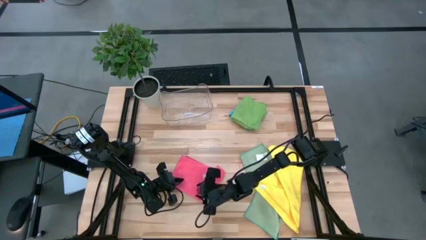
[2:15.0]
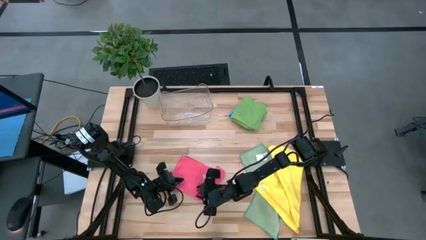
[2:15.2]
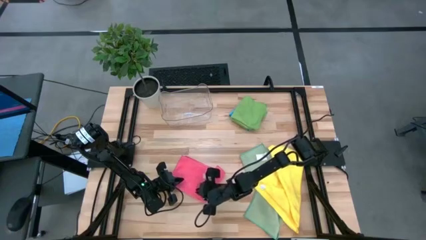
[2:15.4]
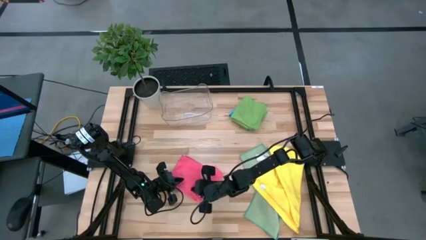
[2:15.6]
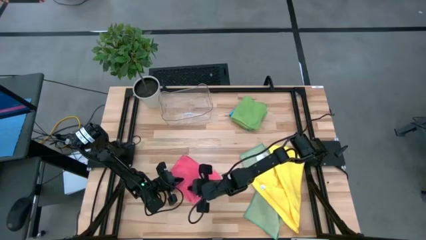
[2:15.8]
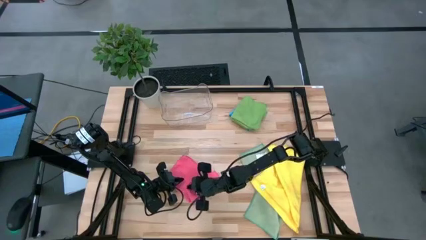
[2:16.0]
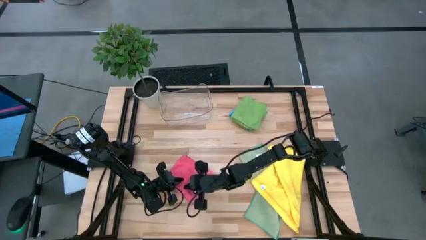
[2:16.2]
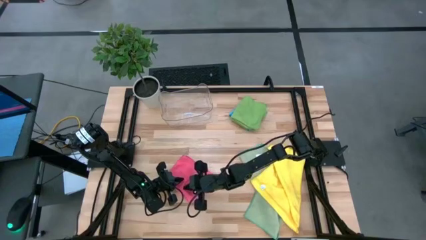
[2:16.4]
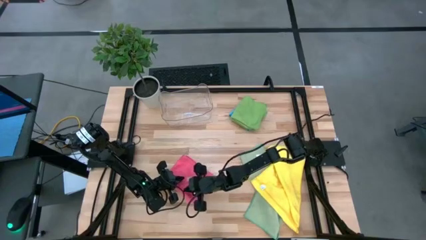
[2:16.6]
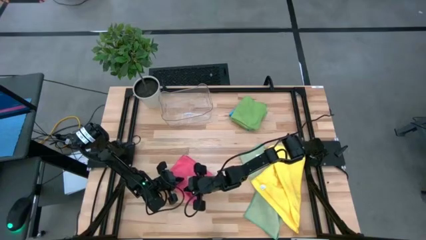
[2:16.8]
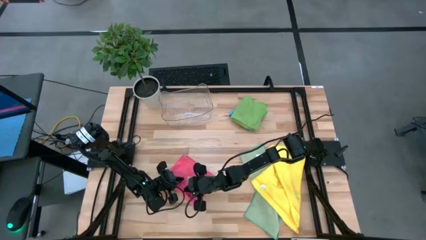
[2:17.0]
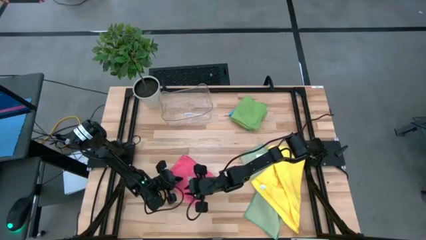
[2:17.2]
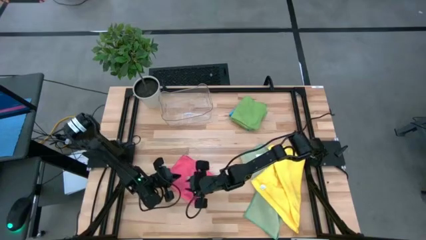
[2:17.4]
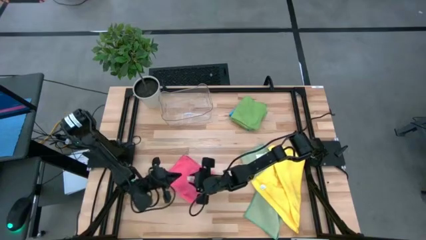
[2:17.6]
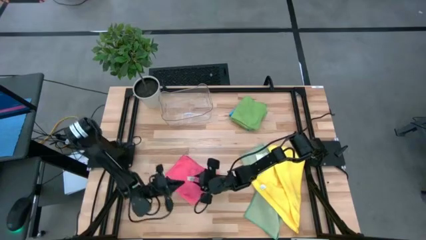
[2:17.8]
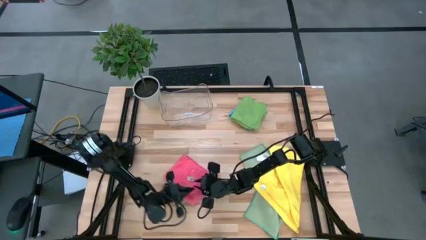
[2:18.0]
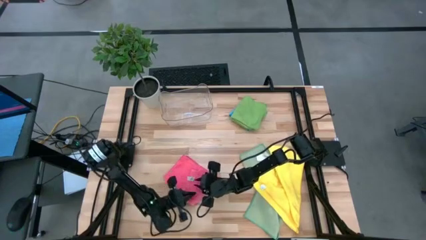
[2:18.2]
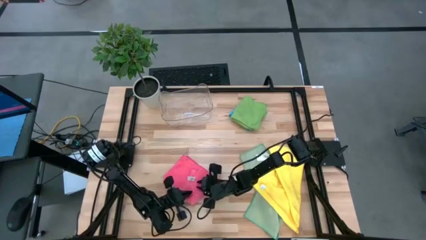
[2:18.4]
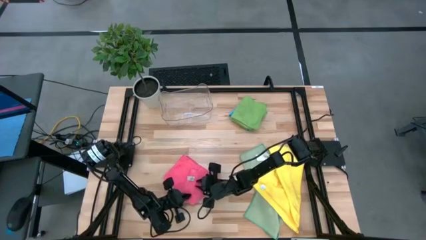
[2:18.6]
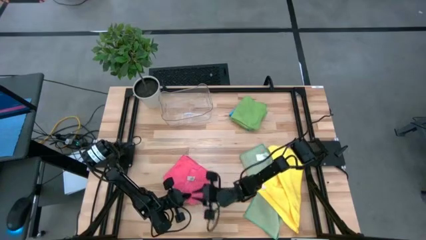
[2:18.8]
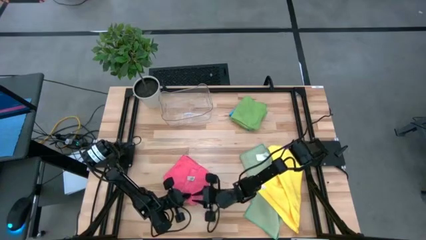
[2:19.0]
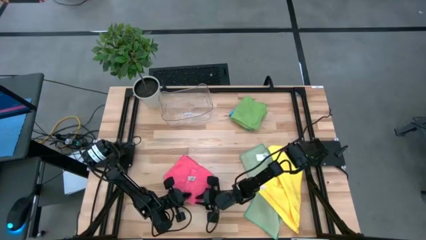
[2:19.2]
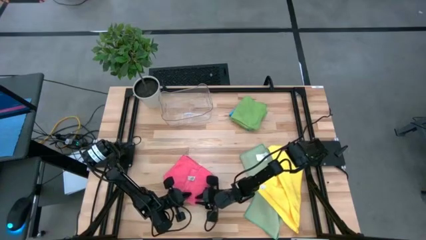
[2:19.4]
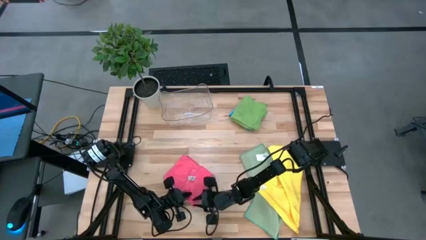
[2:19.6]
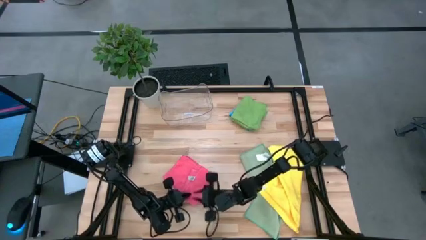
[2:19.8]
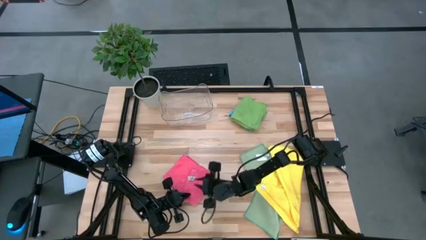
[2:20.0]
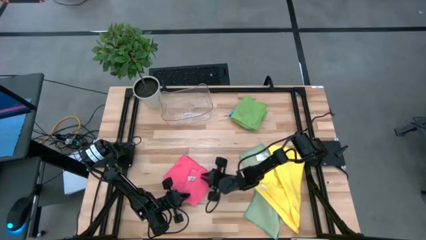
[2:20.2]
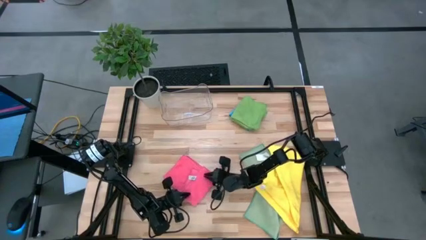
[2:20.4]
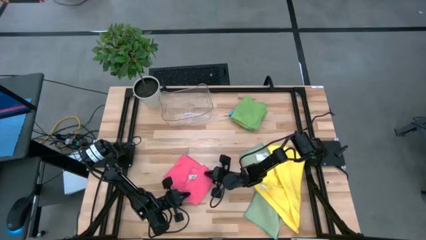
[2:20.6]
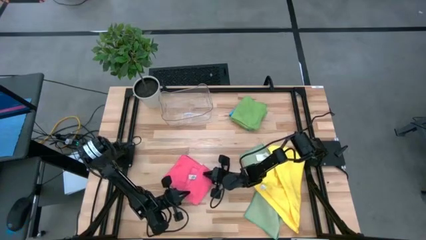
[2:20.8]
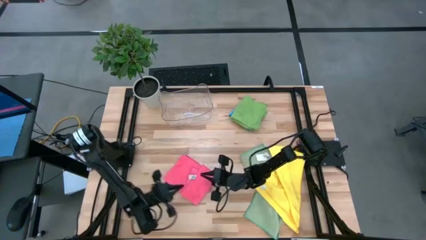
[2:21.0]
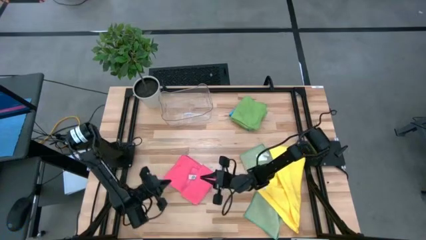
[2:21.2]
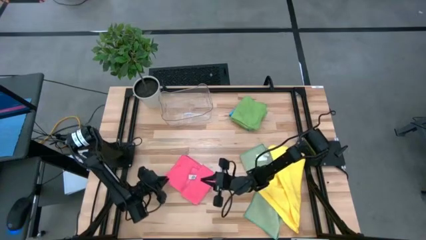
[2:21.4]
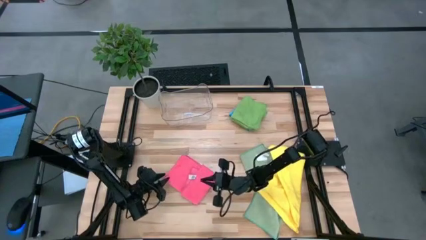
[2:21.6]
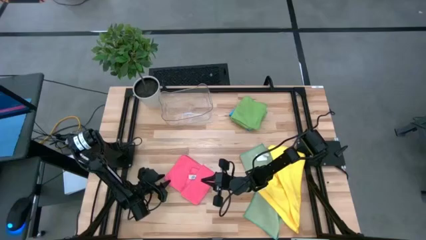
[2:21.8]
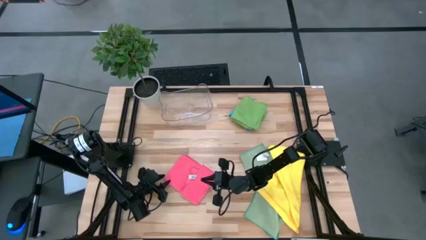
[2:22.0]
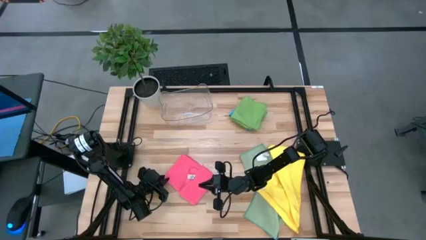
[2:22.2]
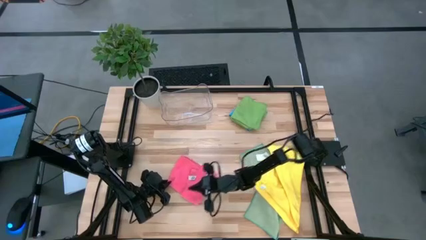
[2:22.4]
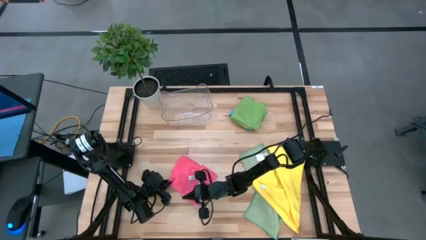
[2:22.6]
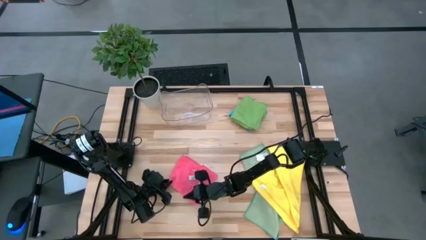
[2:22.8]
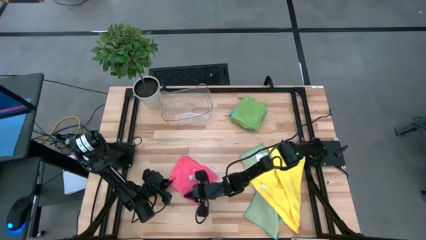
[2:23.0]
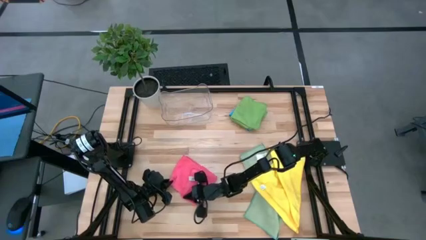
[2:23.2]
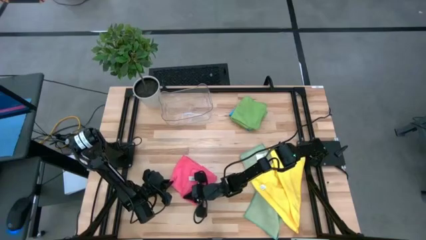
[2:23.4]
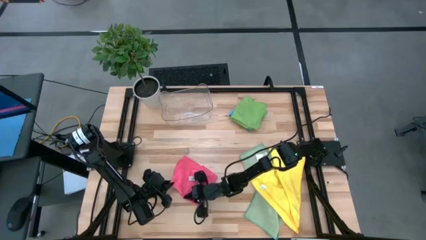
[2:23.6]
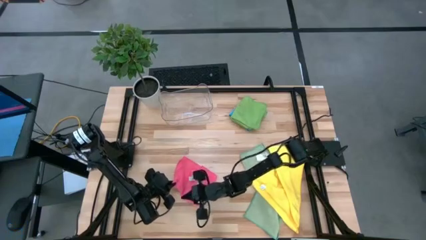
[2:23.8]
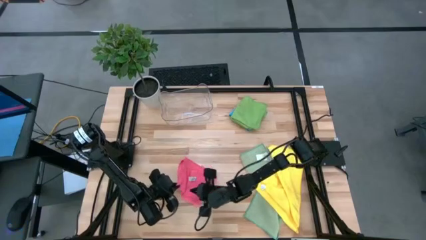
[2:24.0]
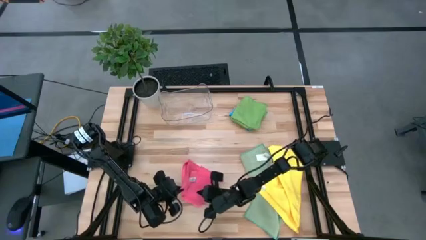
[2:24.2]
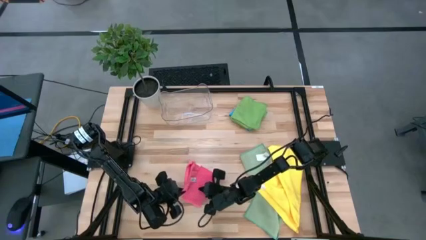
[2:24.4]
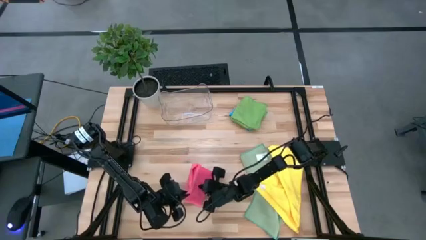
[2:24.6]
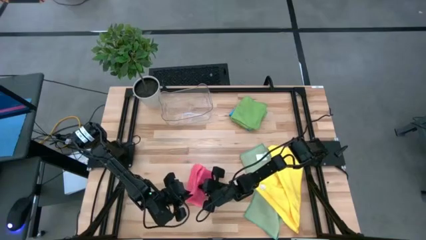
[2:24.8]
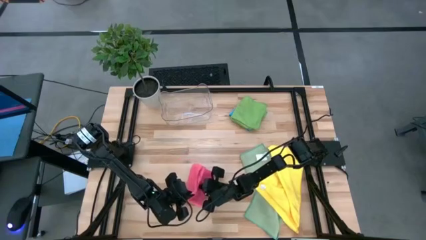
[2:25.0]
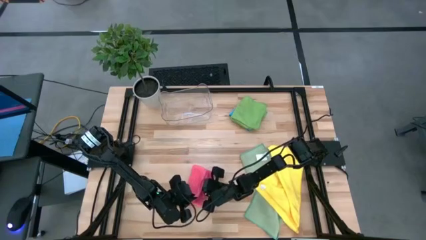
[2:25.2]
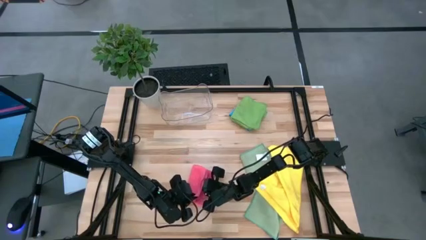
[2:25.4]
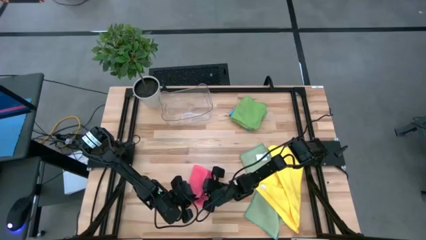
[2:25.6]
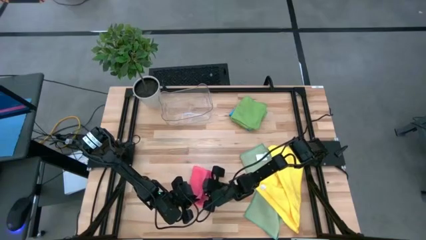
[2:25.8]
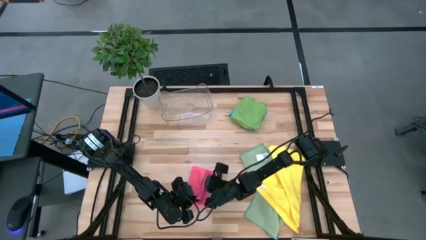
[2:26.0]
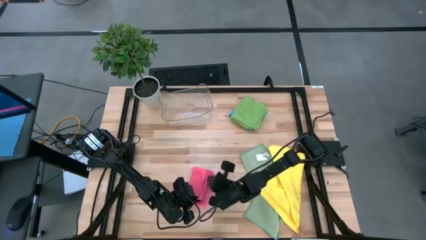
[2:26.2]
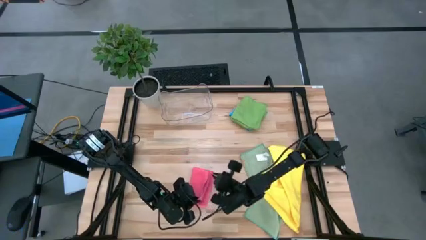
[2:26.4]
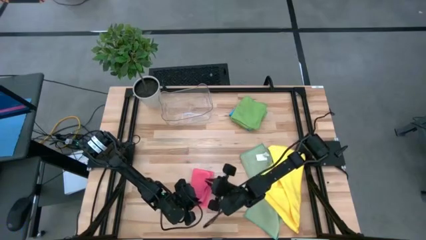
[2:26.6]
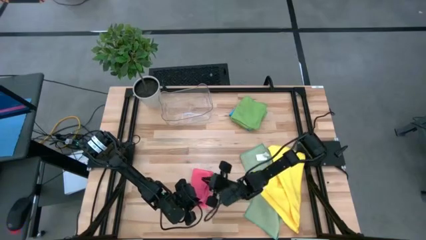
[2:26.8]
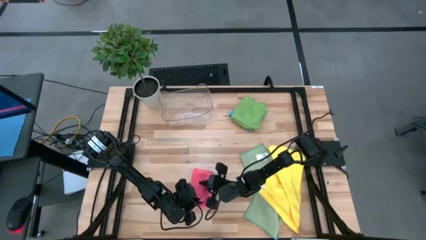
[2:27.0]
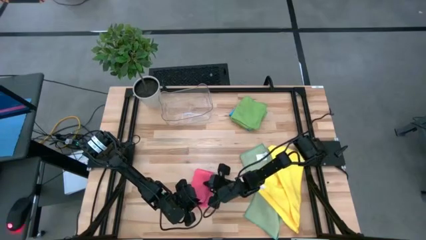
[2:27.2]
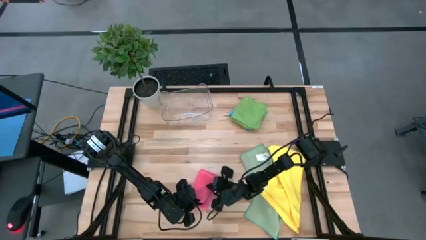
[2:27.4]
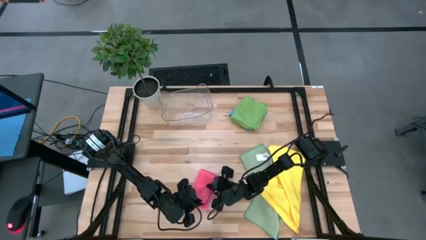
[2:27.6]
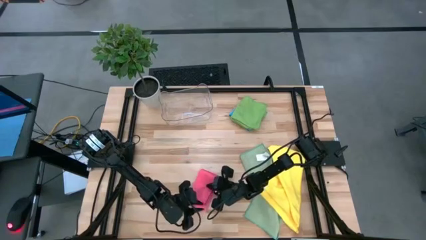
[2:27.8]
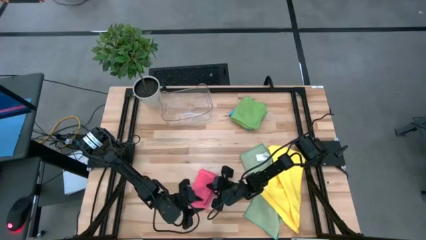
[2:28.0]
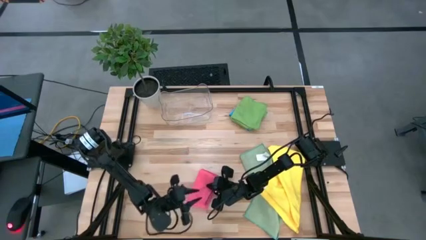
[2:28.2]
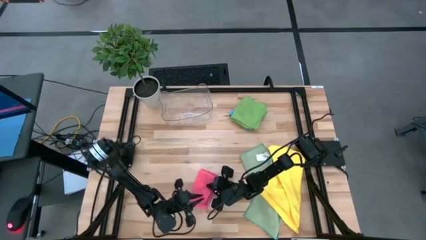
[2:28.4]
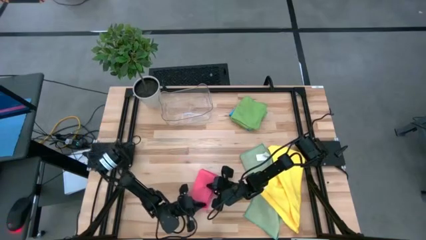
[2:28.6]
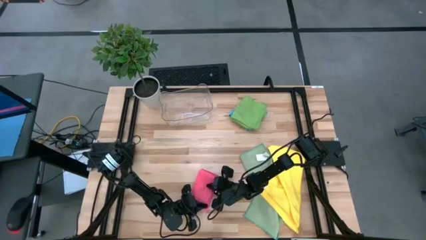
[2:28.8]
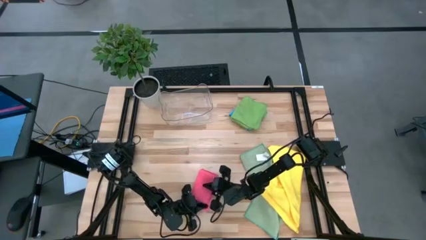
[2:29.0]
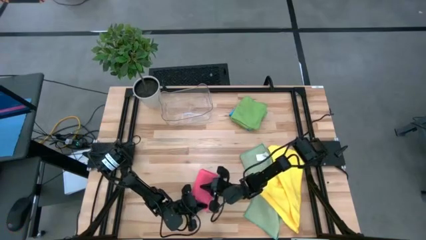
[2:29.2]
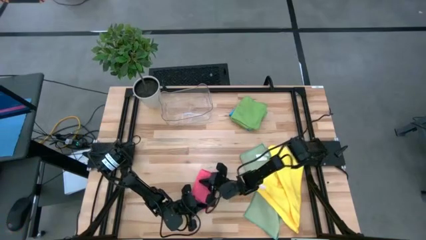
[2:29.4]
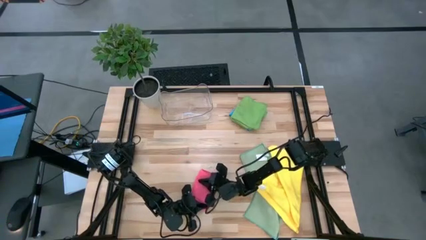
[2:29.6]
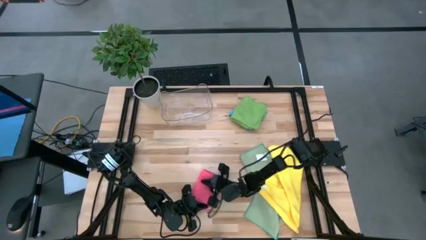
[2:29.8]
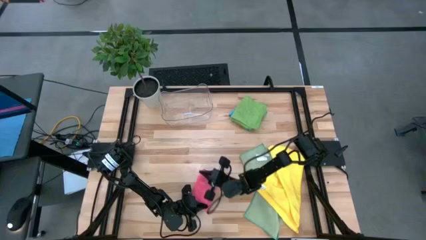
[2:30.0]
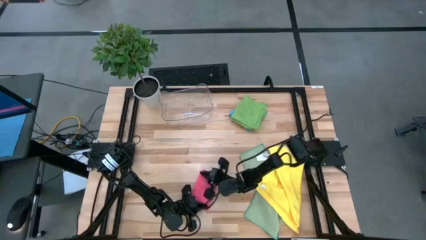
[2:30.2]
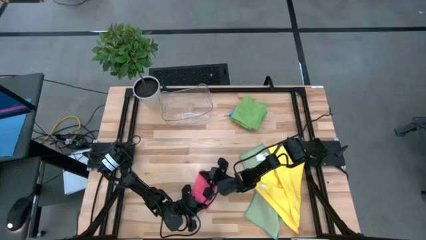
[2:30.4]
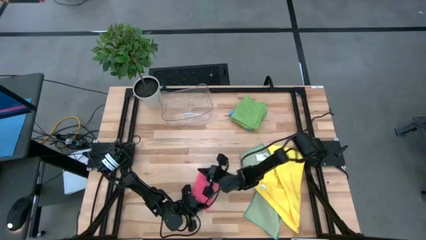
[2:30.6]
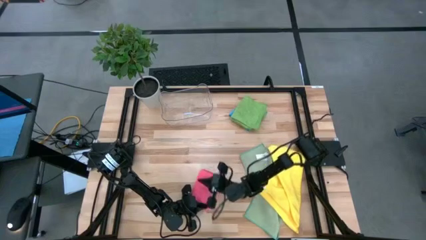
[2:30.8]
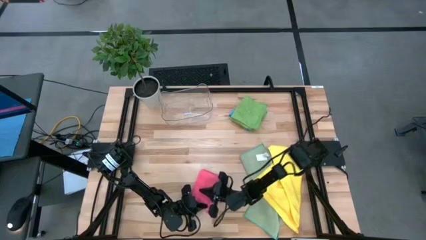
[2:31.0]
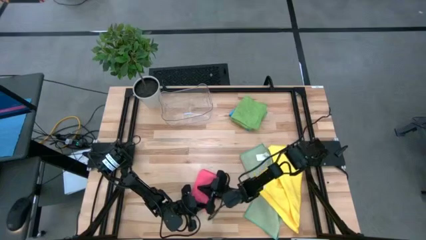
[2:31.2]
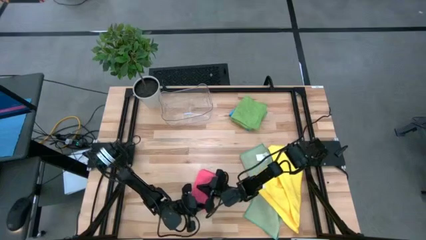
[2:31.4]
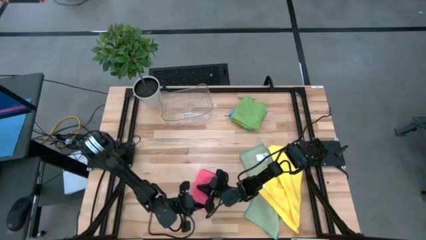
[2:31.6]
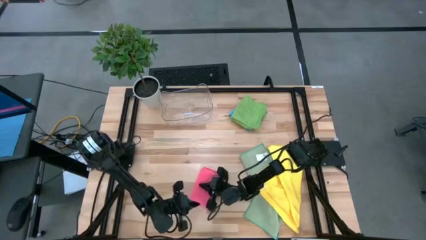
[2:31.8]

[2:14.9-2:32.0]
Task: Fold microfiber towels
Fold the pink microfiber cloth
